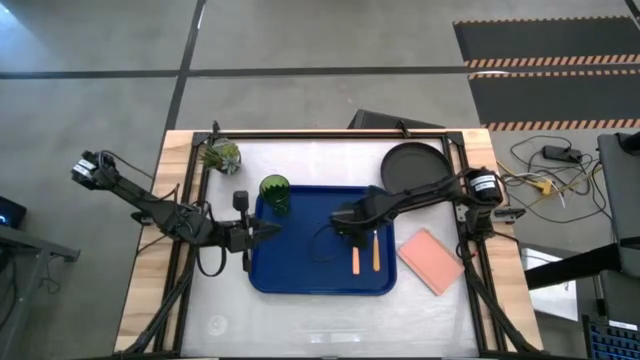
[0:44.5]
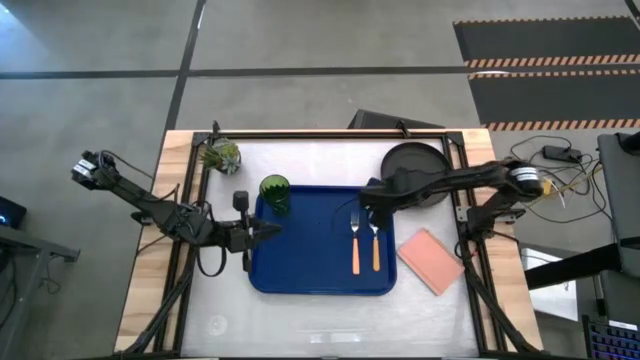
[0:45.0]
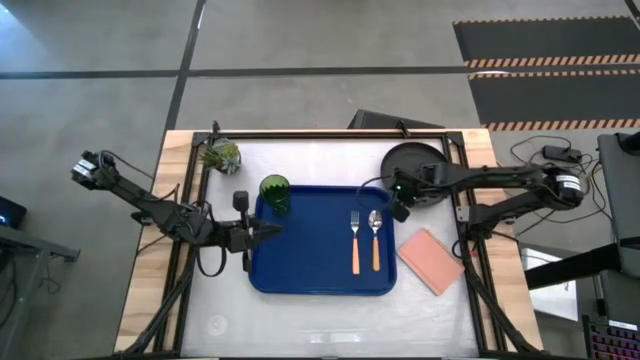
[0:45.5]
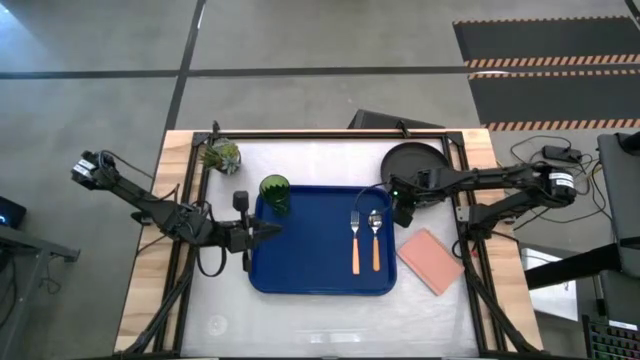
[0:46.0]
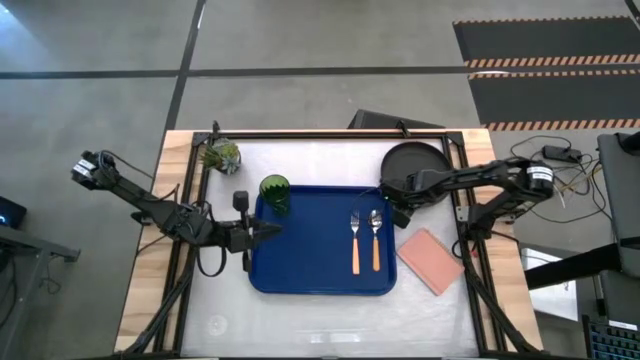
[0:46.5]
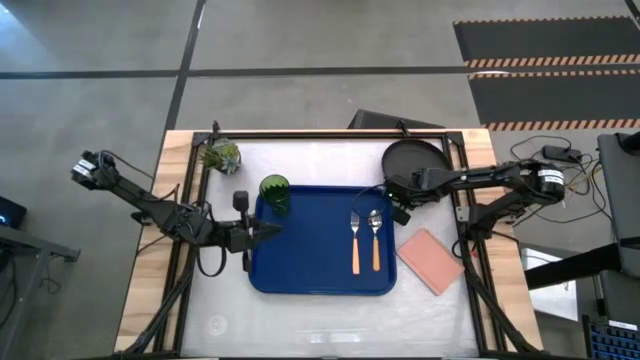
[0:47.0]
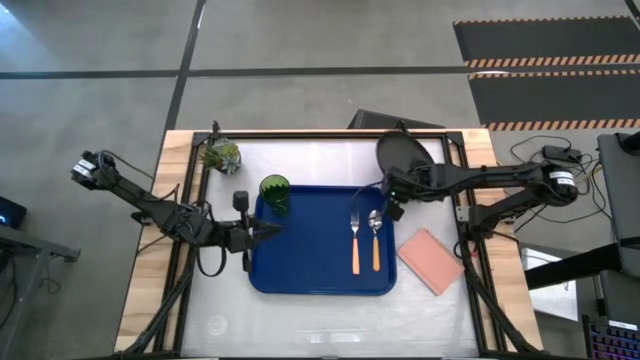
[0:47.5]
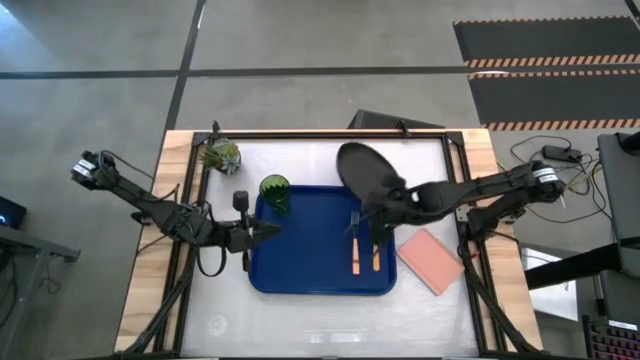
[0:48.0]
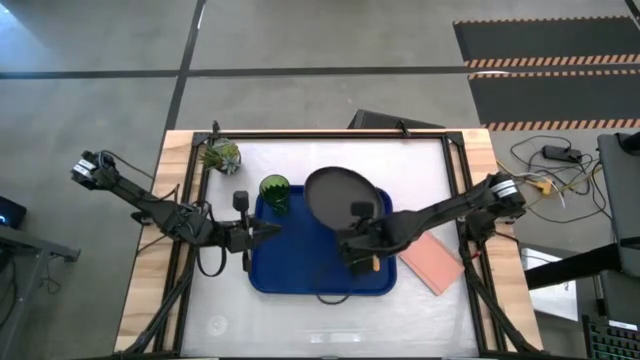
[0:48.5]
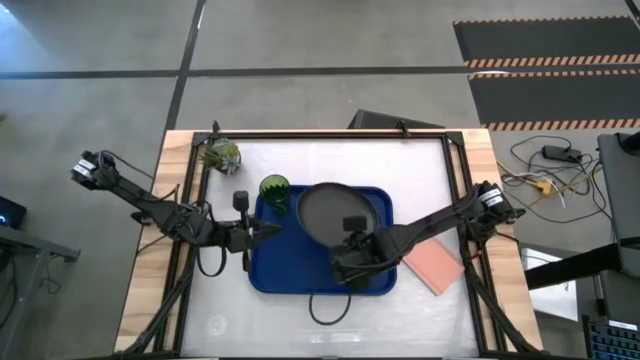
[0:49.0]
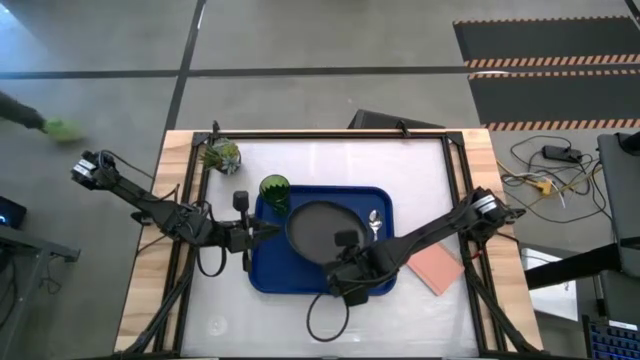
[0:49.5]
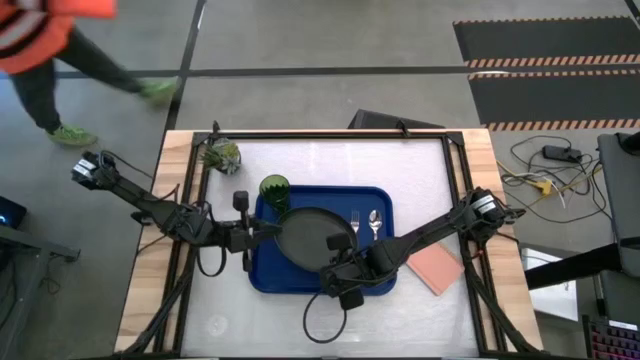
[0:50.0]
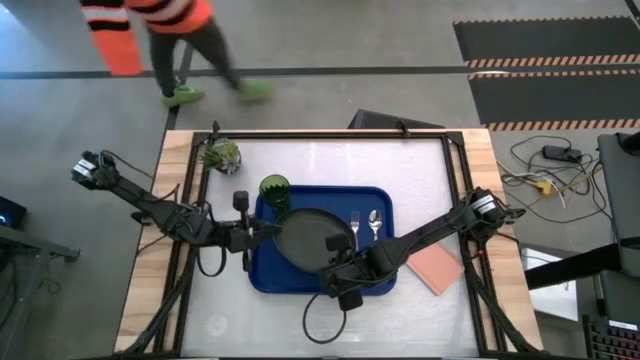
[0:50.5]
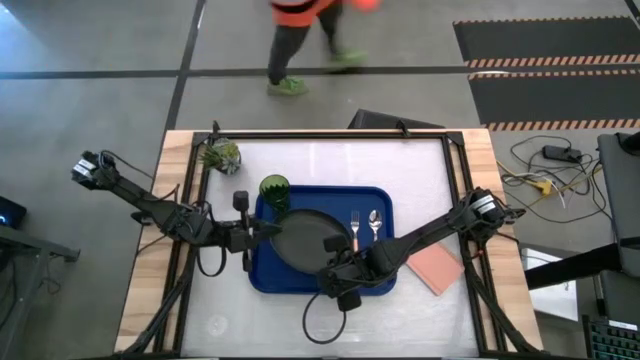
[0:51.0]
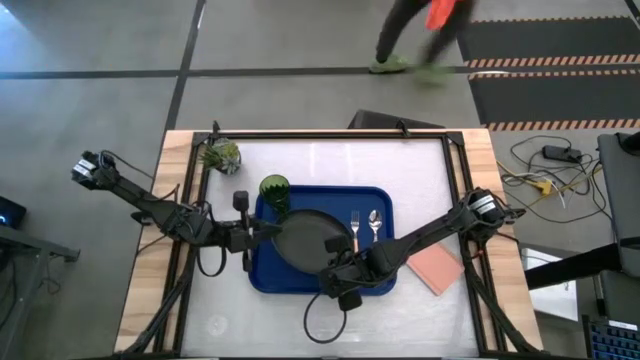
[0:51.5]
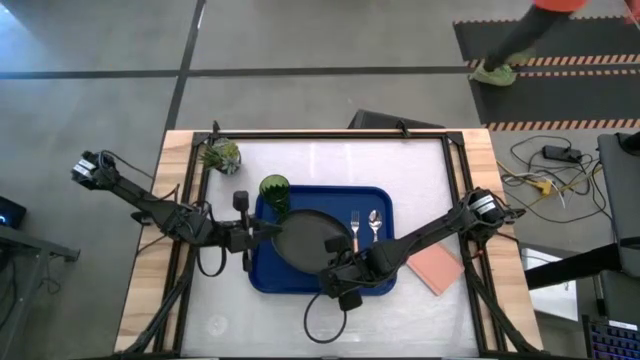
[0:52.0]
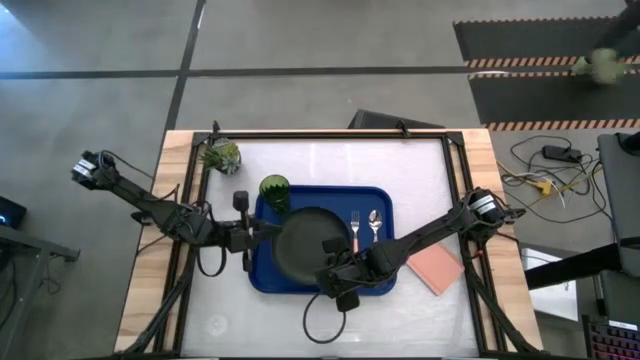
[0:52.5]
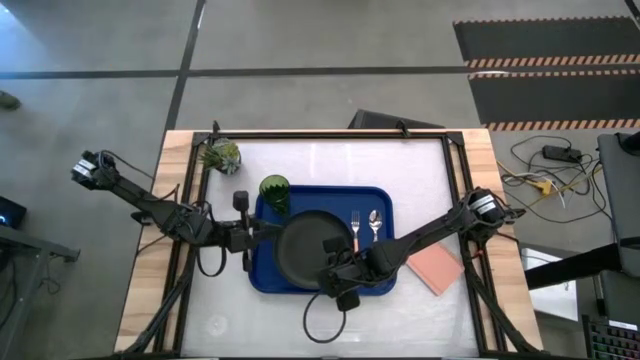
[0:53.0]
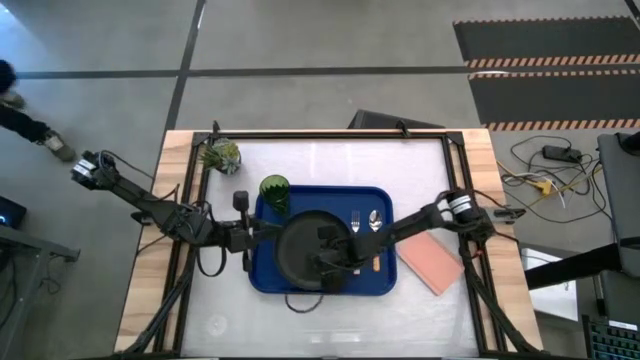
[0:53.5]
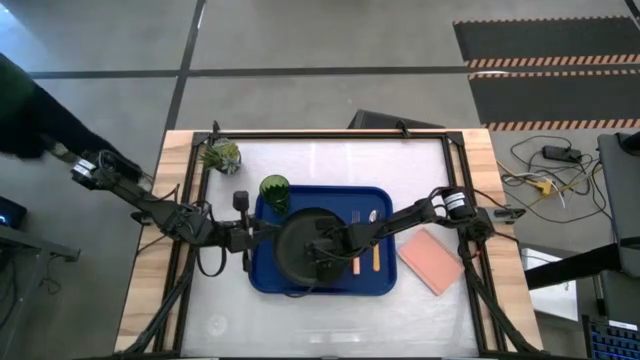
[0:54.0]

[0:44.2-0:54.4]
Task: Pick and place plate/cup/fork/spoon on tray
Put the black plate on the blue tray

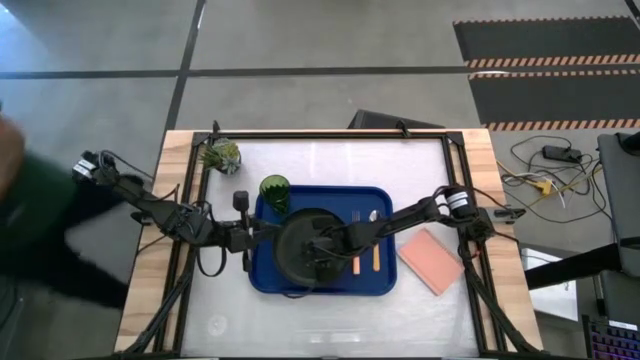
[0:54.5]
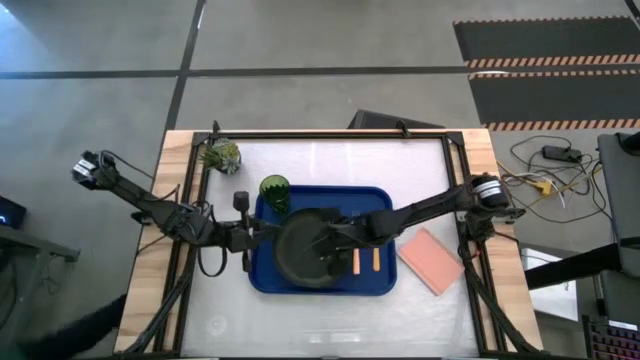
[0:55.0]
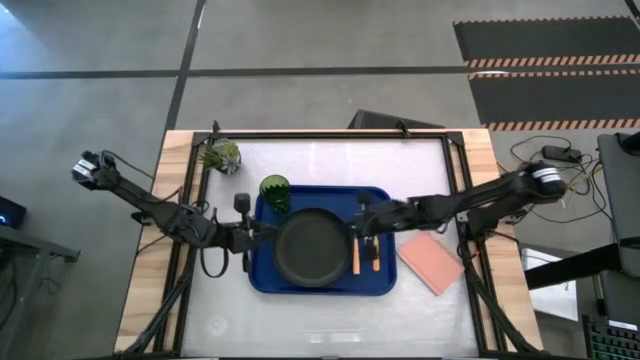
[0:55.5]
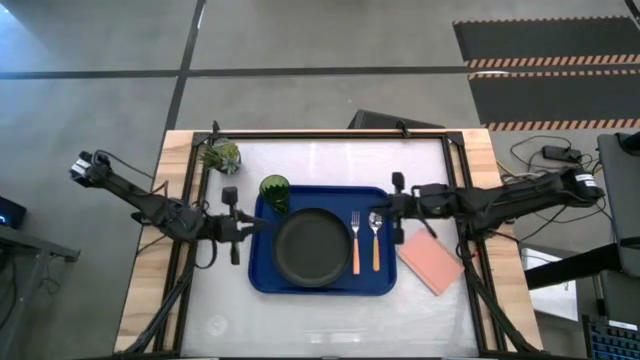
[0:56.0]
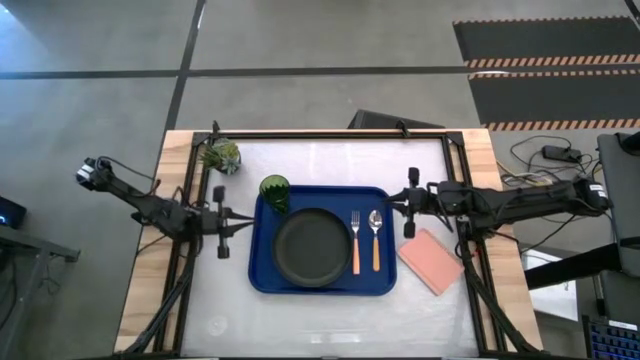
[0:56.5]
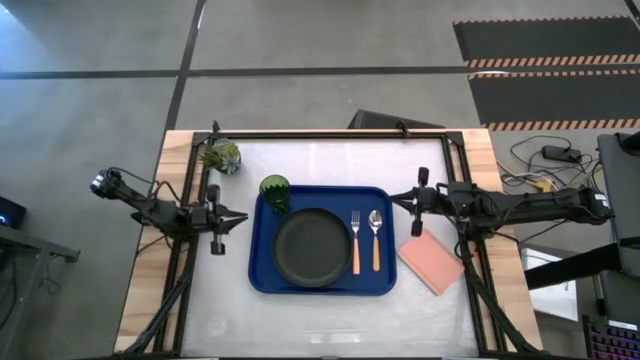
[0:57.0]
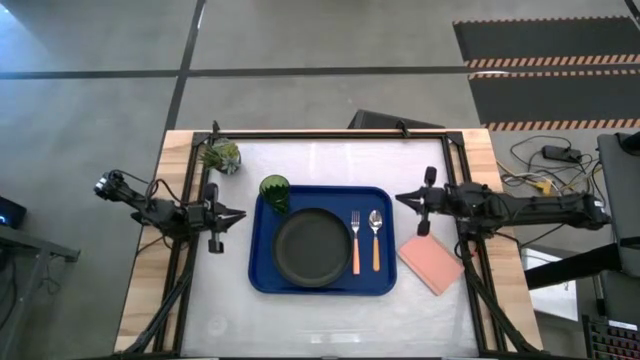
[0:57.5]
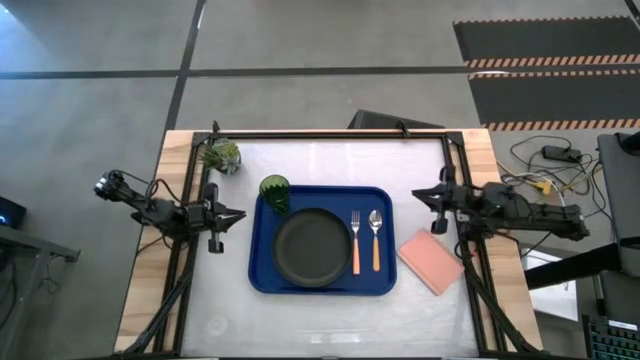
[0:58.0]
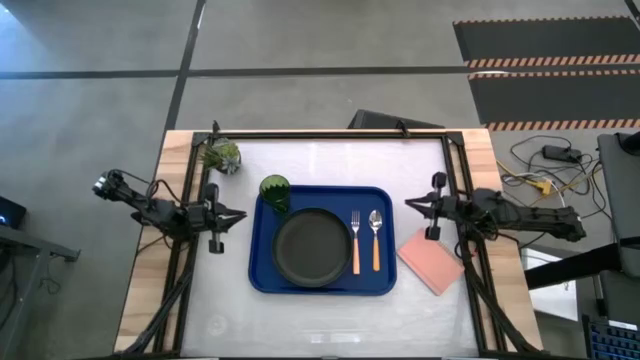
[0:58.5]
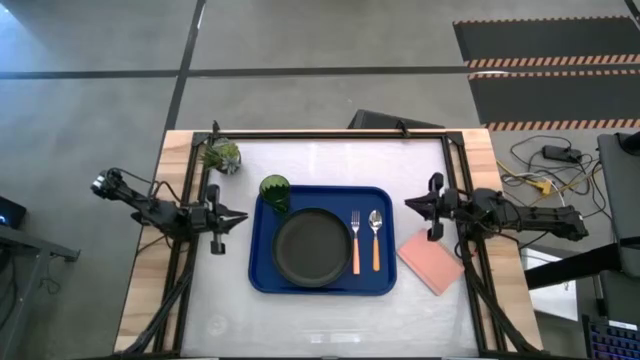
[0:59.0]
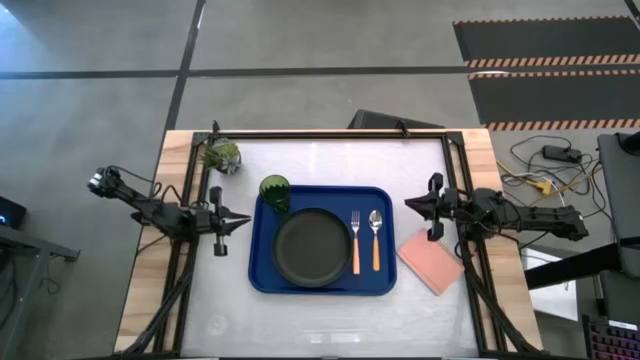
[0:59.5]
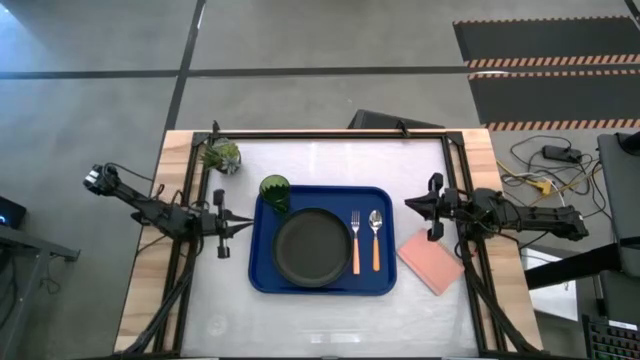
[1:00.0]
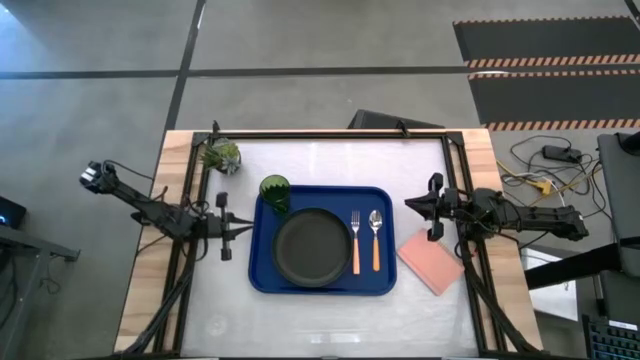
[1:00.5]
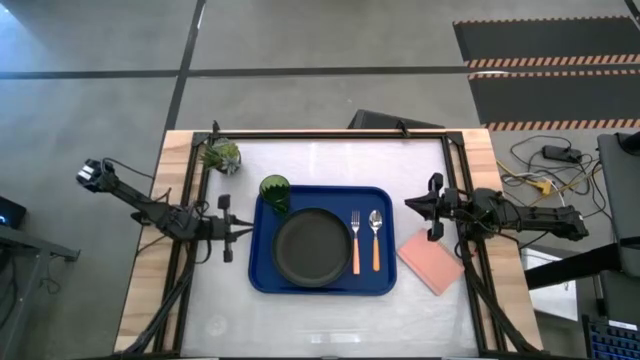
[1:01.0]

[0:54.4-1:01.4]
Return to Home Position

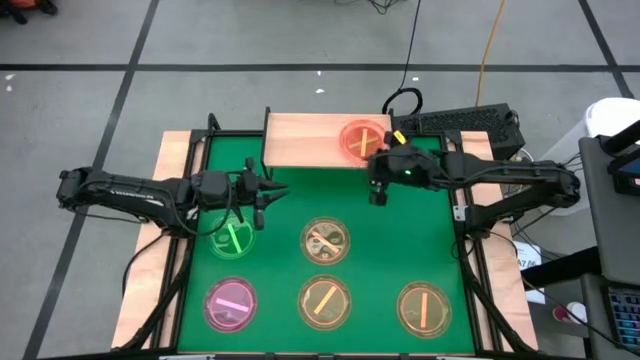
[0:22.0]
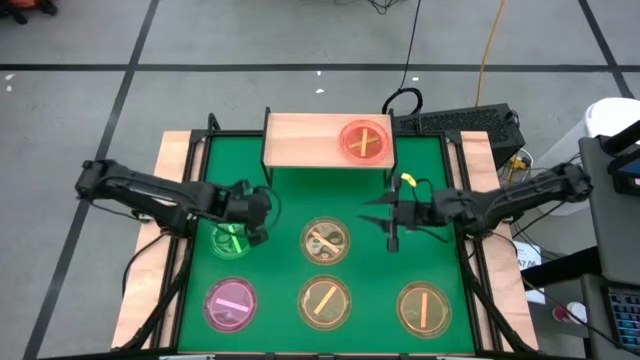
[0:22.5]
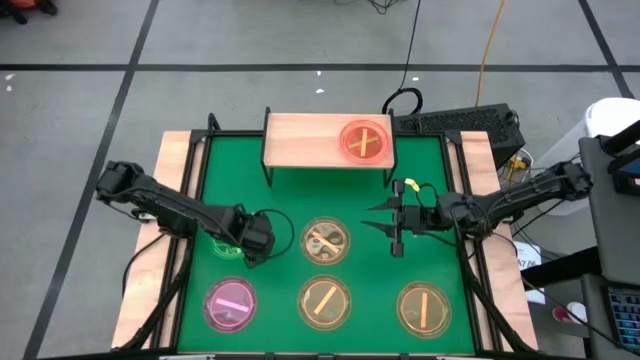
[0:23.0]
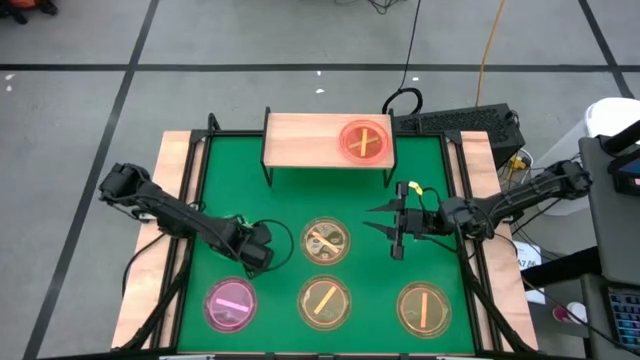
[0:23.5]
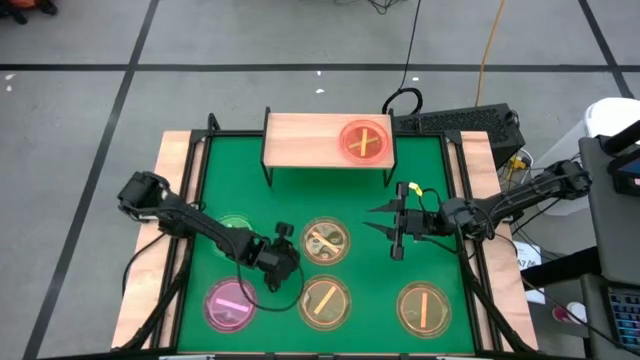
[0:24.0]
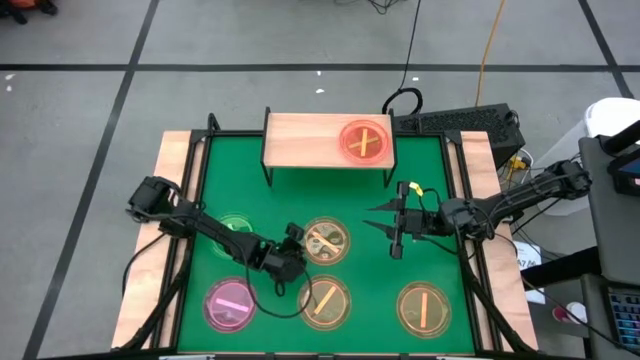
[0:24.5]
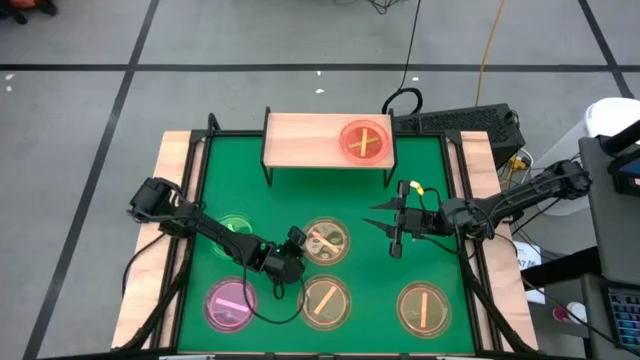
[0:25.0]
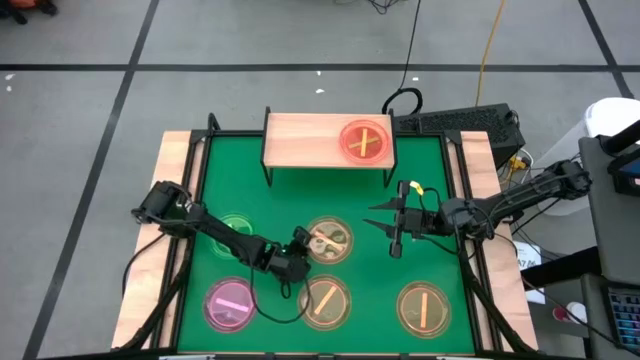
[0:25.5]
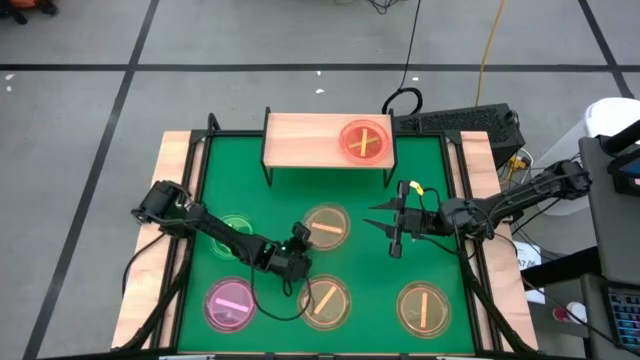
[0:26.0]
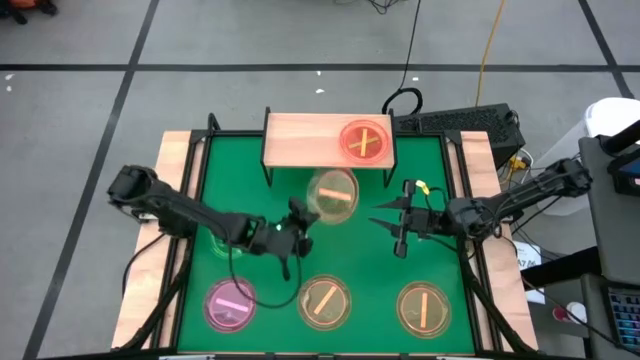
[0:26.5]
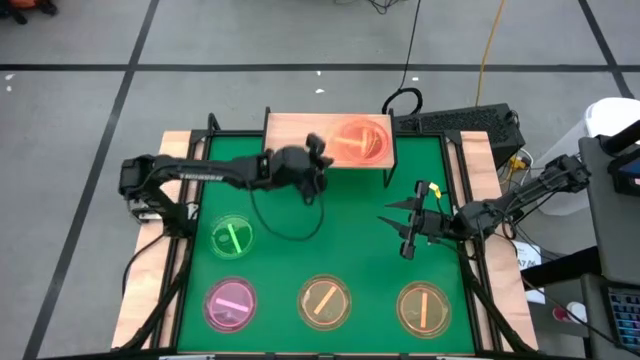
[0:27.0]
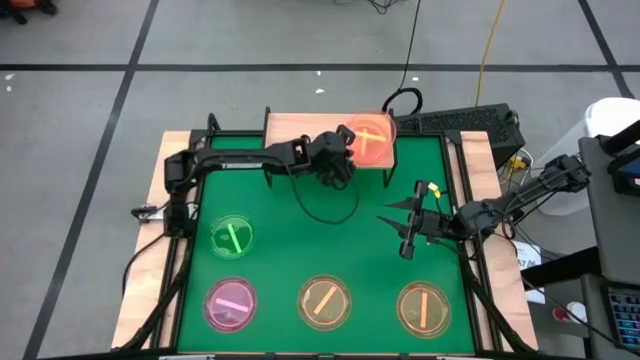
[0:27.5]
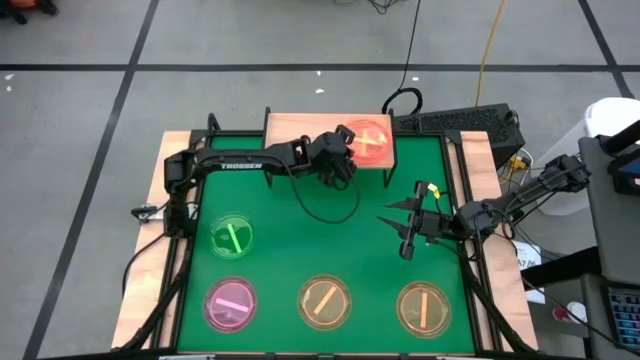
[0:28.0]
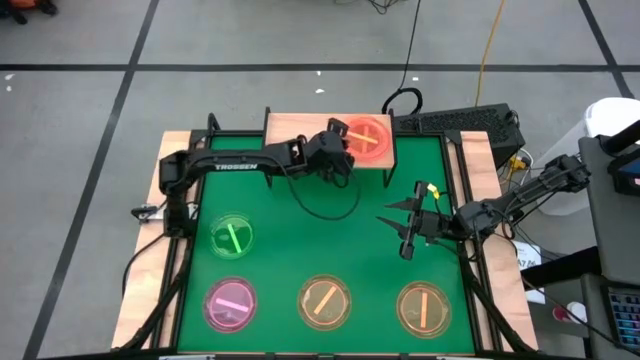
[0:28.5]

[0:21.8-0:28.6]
Task: Place and stack plates onto a shelf
Stack the top left orange plate on top of the orange plate on the shelf
